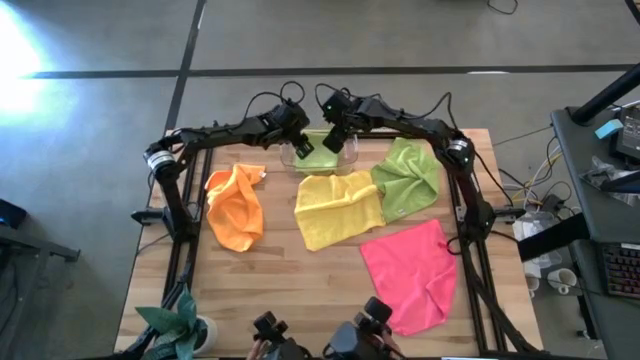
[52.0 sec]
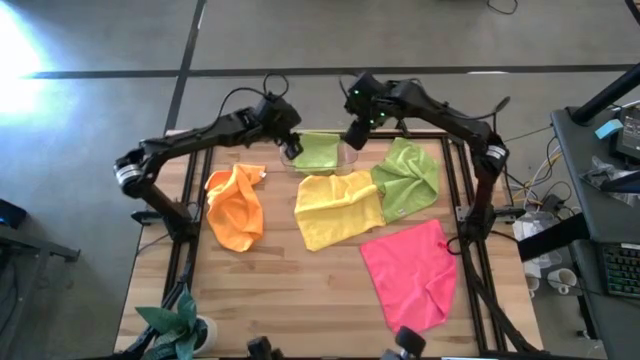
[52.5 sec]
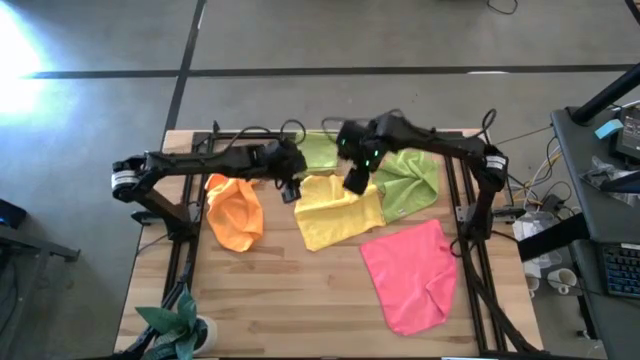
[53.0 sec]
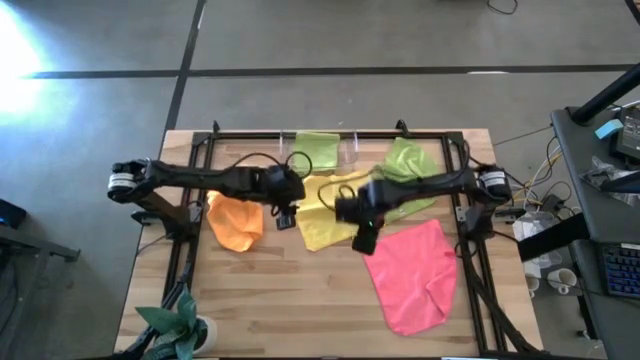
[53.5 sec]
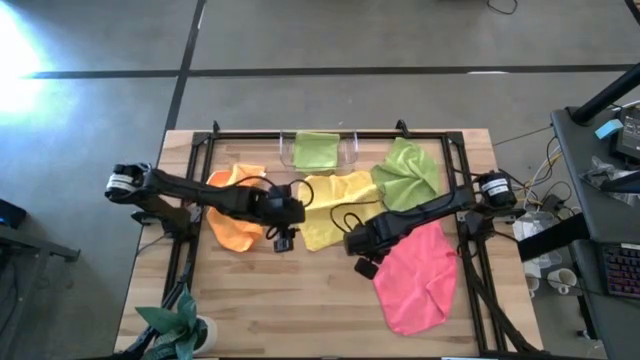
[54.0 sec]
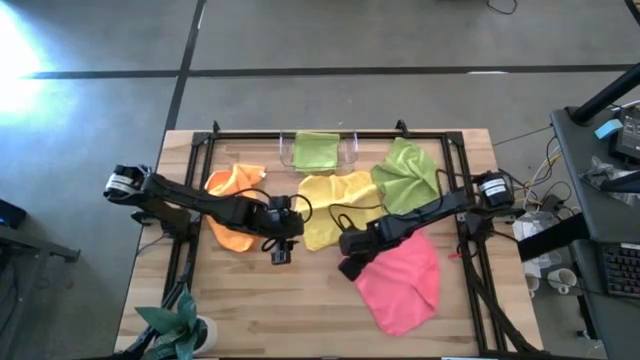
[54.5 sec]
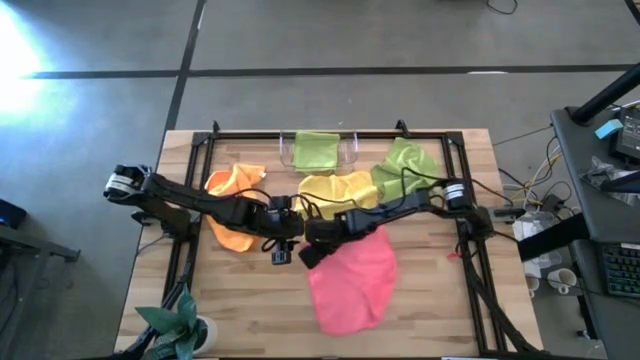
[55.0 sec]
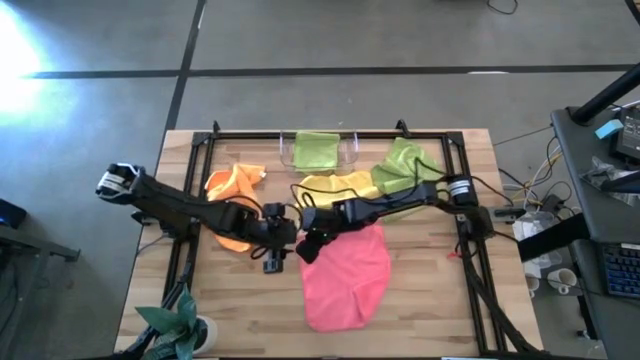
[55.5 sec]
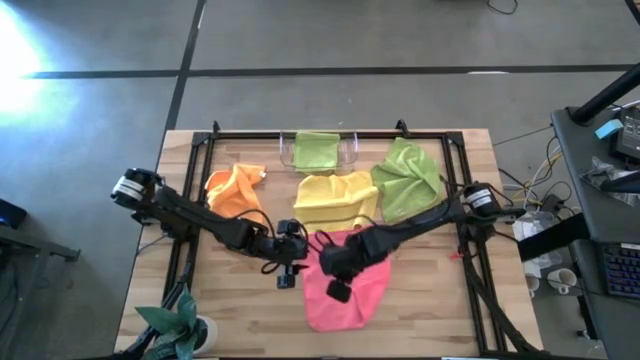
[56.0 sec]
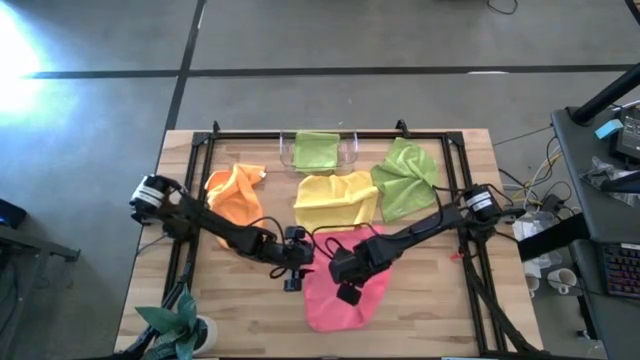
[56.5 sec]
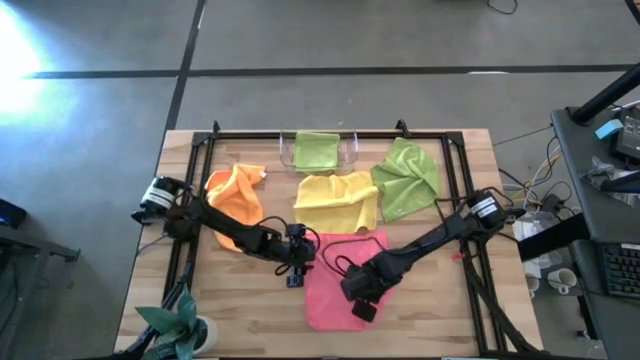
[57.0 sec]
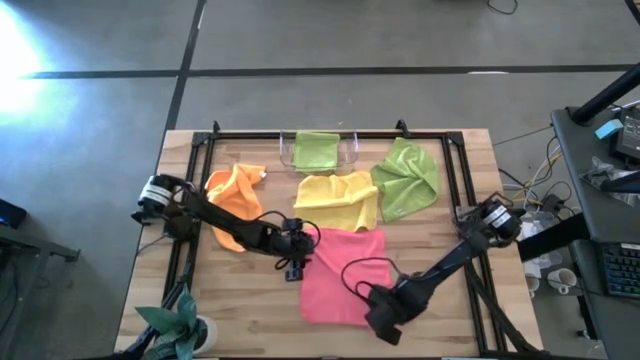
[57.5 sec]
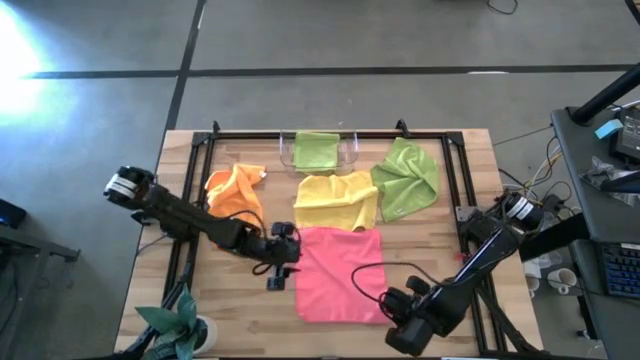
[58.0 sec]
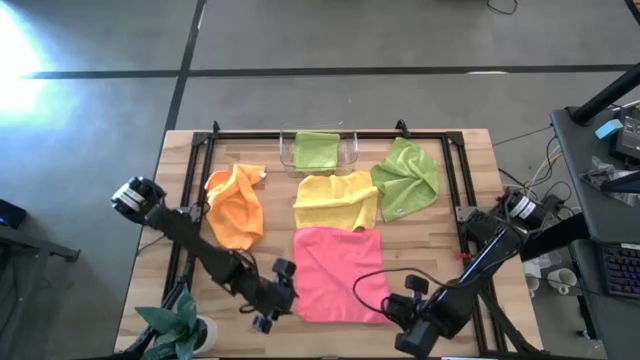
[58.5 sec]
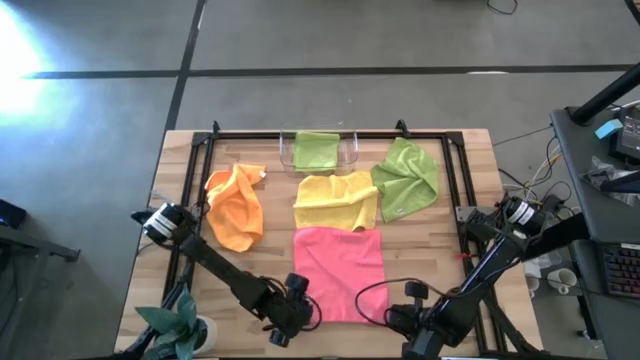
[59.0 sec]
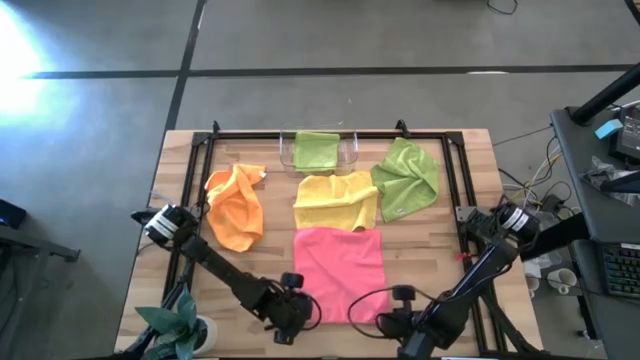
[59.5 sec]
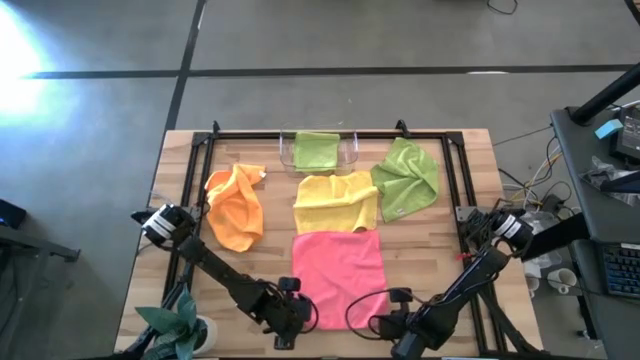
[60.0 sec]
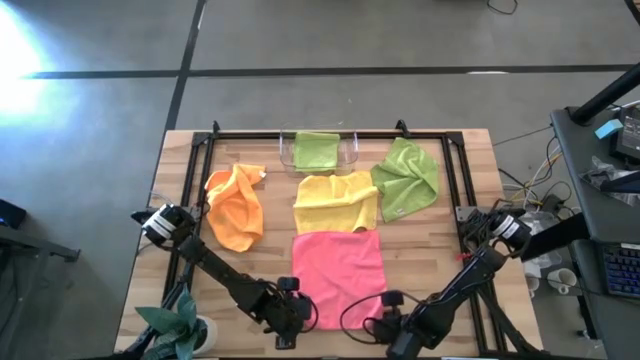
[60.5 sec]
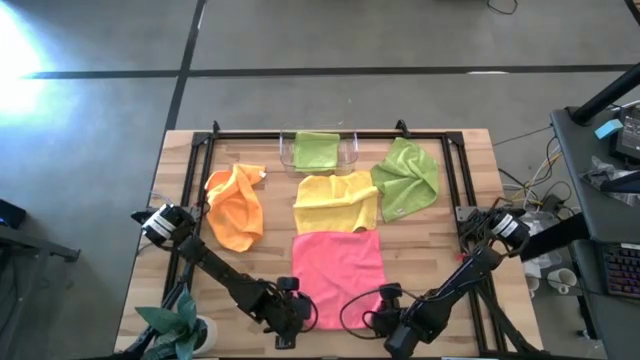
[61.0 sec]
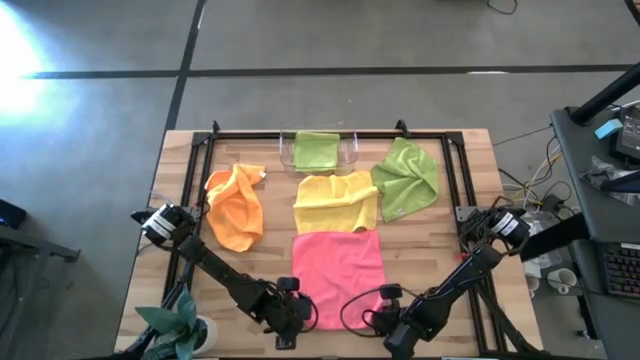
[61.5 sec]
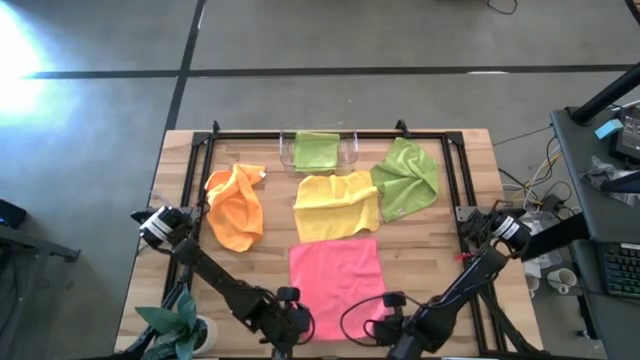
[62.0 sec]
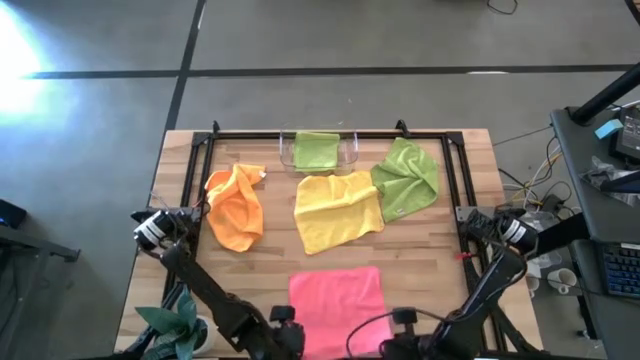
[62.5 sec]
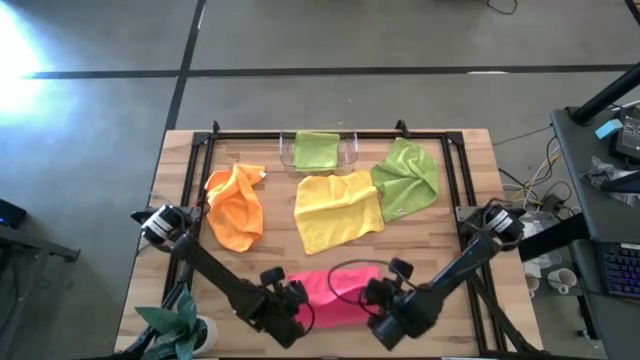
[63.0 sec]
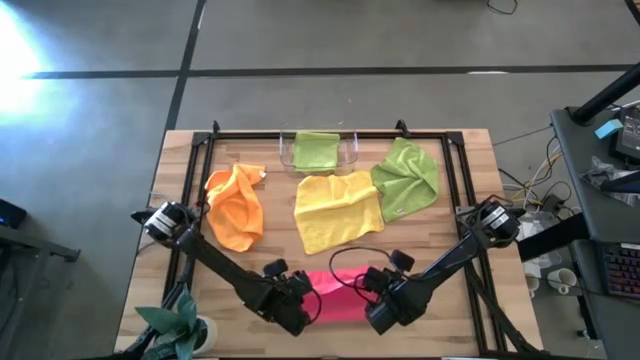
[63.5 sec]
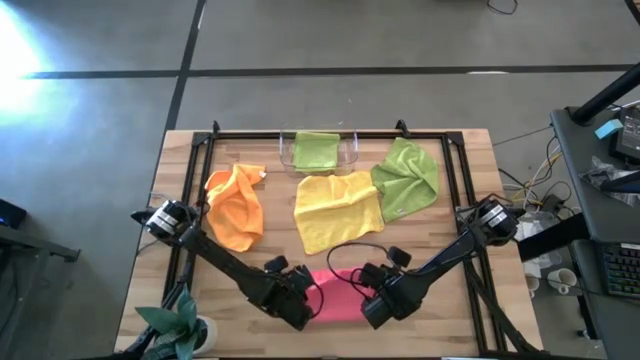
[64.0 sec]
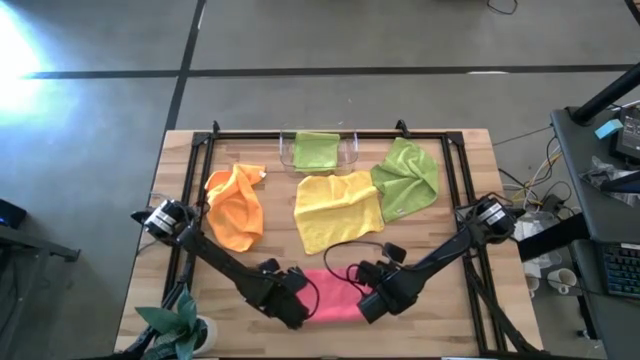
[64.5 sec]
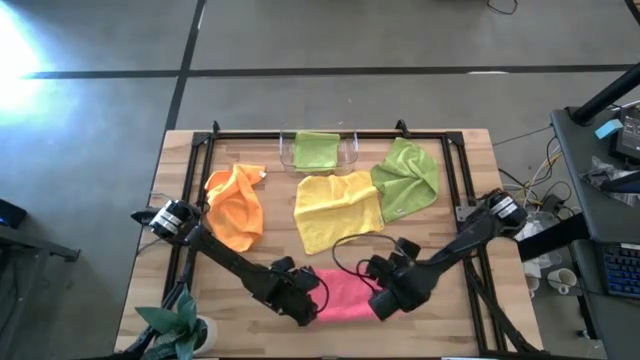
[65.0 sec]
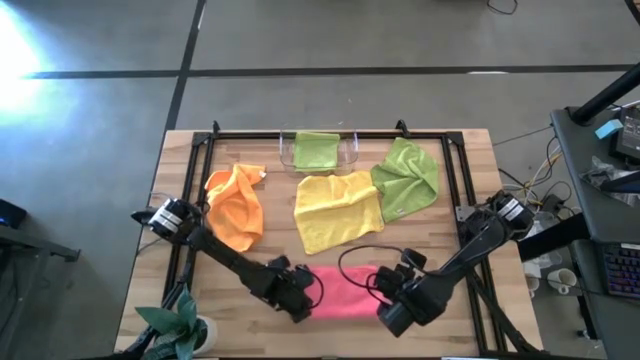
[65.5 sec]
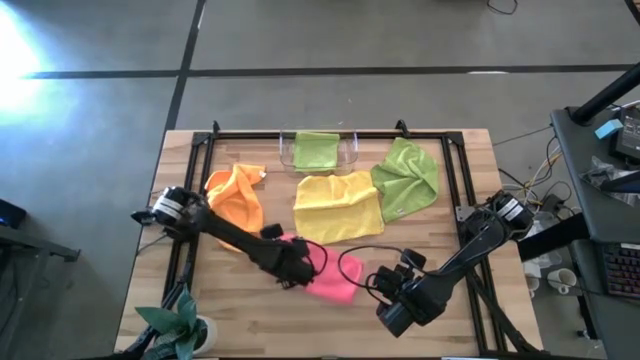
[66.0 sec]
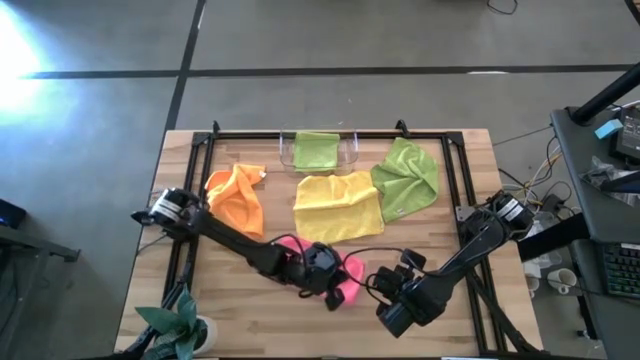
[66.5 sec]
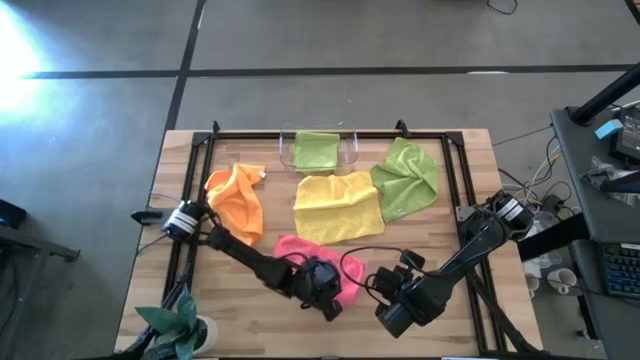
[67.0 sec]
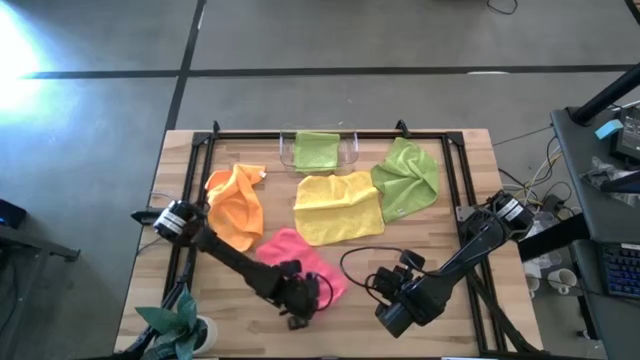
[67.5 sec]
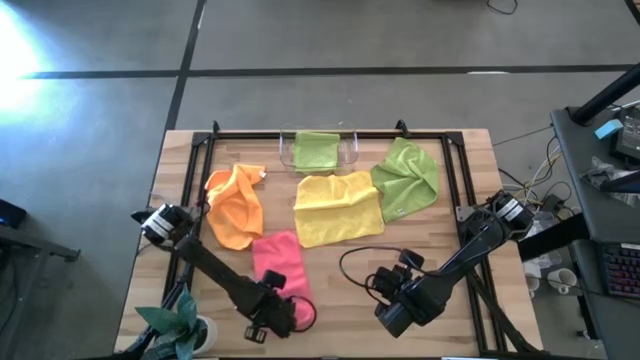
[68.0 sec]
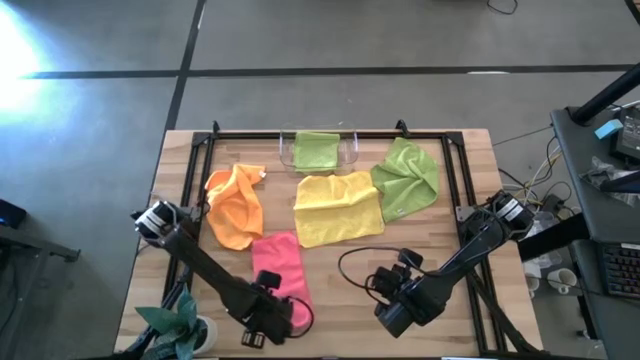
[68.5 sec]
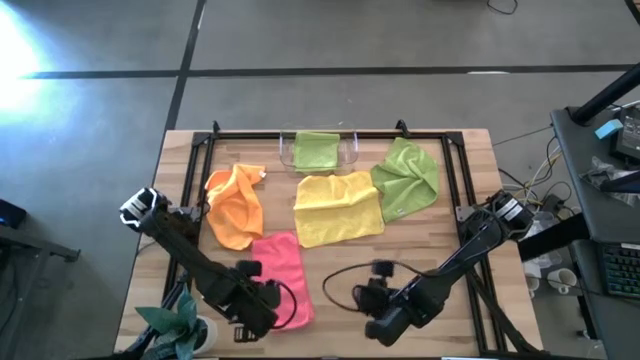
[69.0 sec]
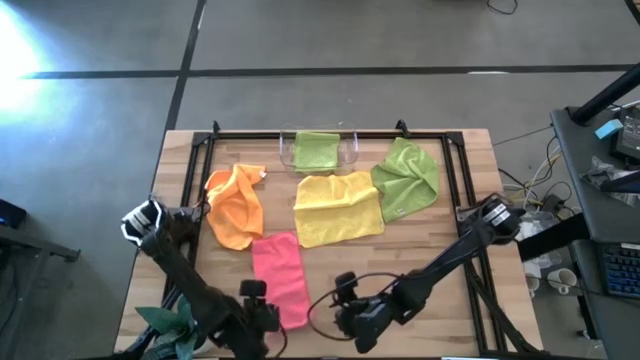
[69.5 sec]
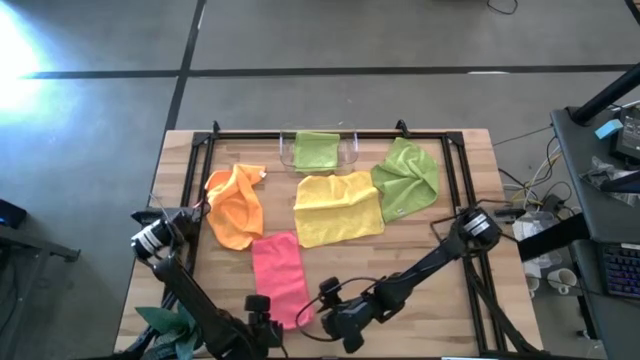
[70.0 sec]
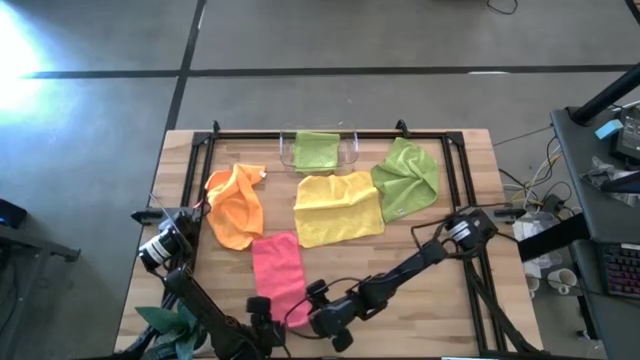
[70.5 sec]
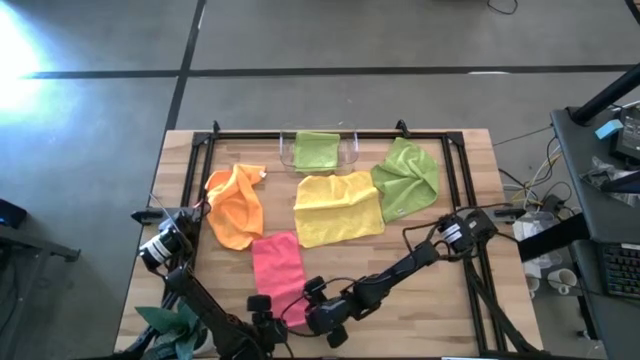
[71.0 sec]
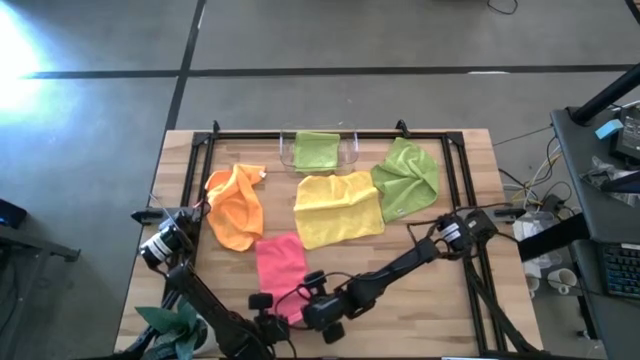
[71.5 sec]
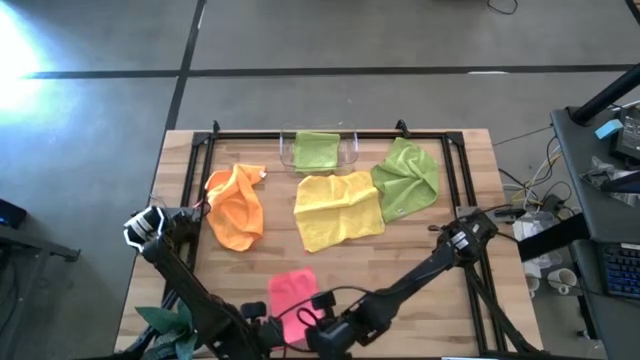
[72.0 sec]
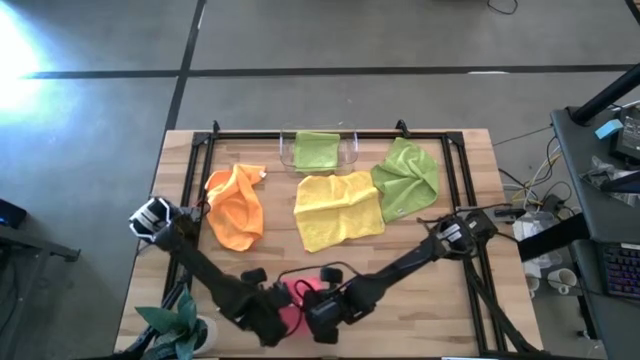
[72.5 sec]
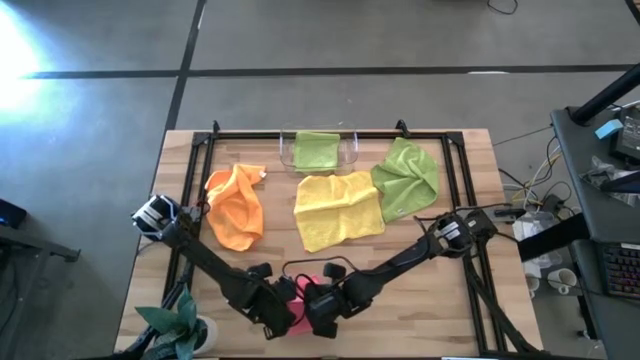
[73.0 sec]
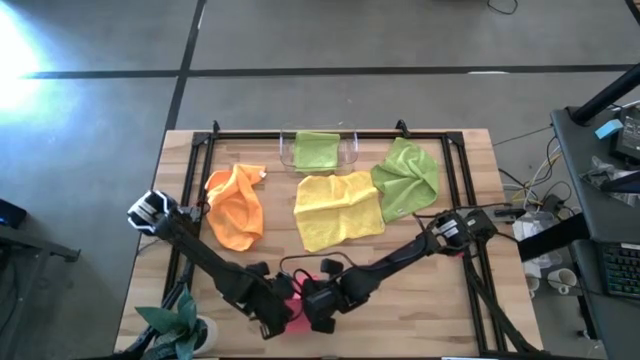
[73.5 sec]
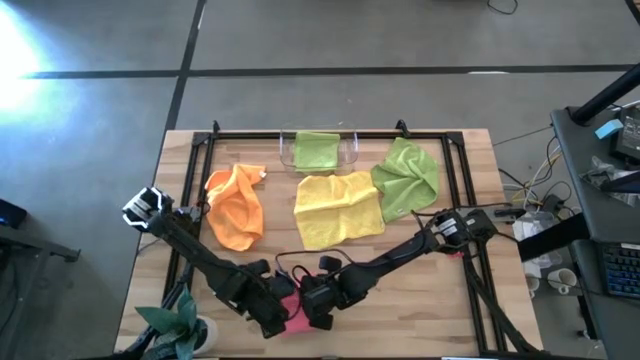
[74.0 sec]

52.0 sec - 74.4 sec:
Task: Fold microfiber towels
Fold the pink microfiber cloth
